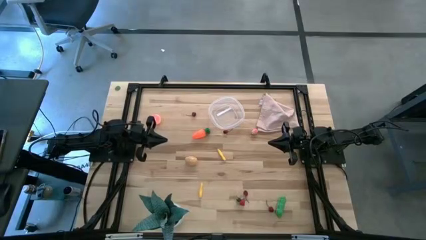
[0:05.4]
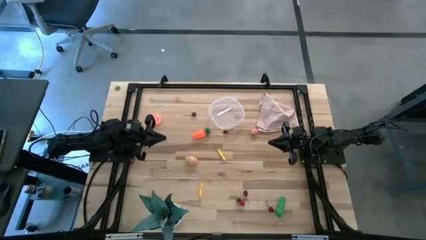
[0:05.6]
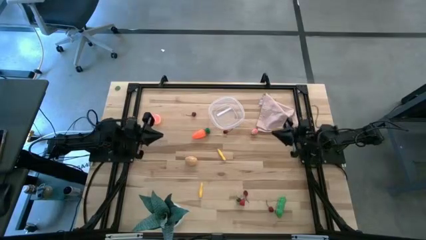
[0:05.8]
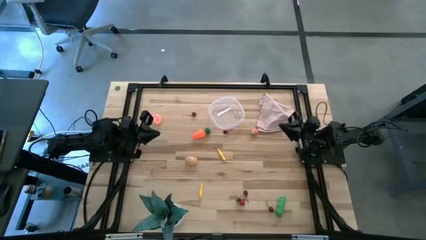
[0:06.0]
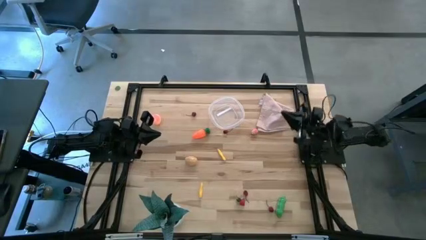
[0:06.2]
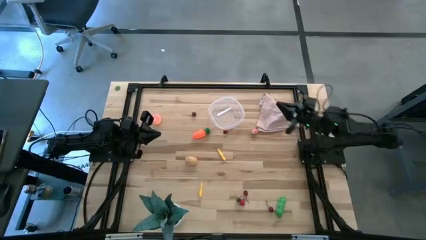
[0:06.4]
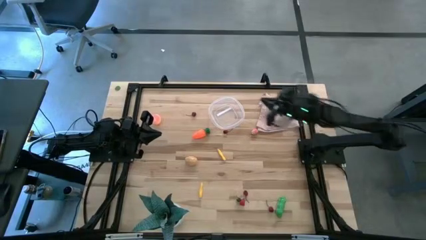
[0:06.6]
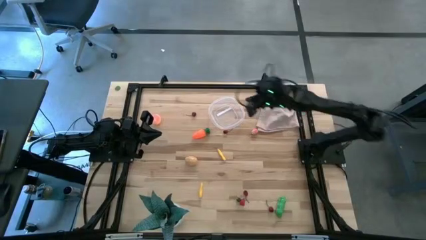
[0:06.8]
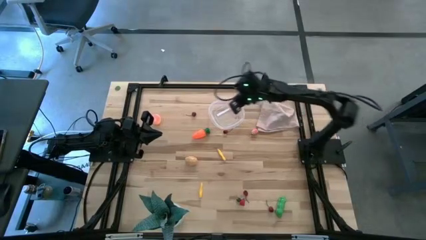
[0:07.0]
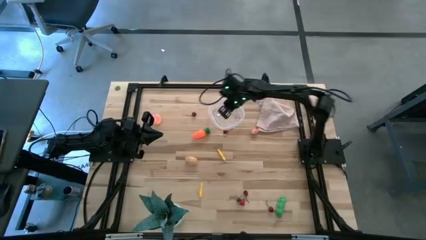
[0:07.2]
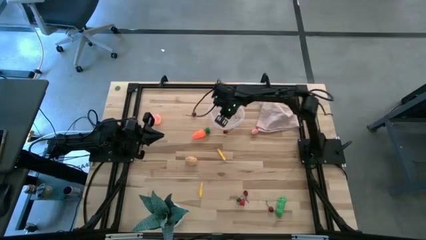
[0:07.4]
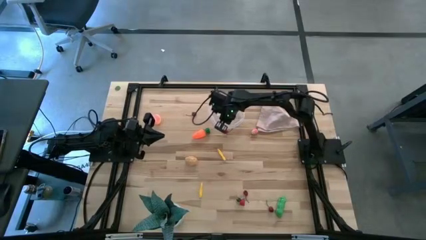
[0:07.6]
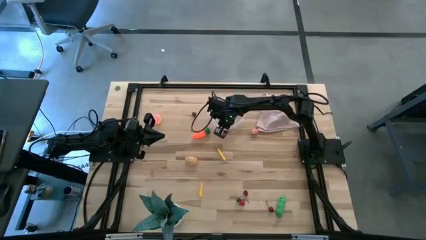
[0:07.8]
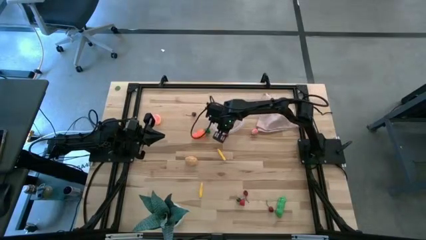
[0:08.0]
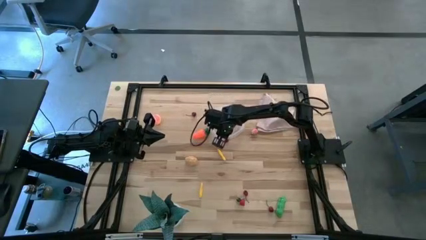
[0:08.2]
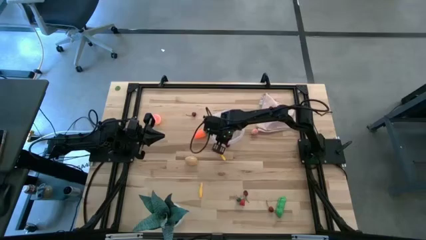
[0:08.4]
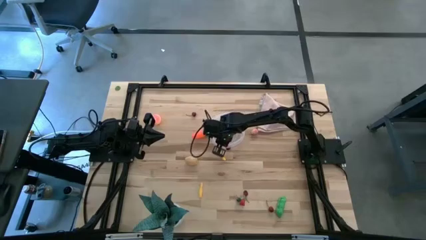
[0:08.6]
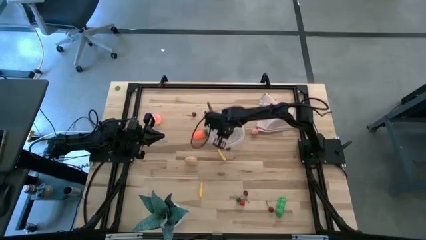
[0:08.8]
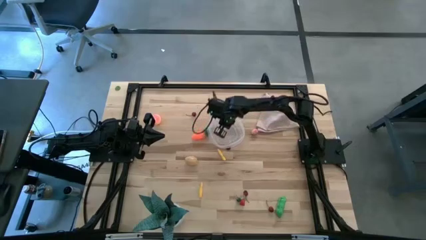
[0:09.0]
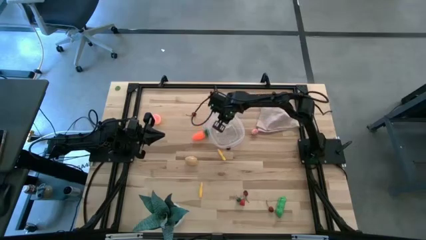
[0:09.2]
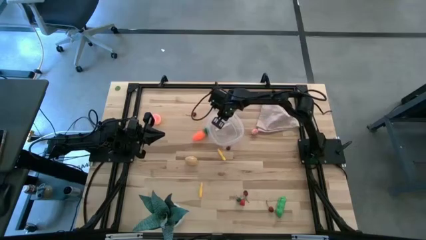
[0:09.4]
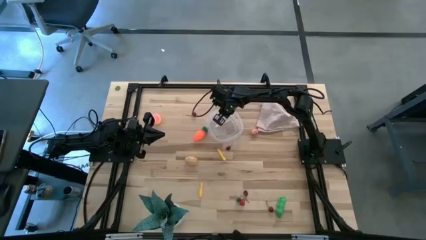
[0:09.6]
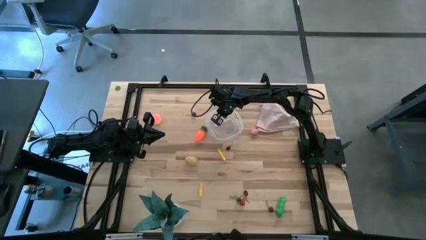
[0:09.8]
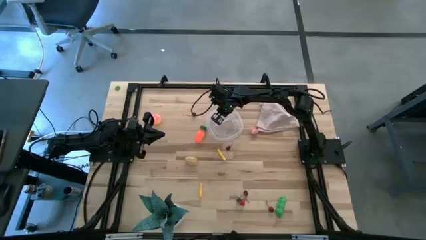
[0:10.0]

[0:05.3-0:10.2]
Task: Pick and placing Produce into tupperware
Adjust the transparent bin

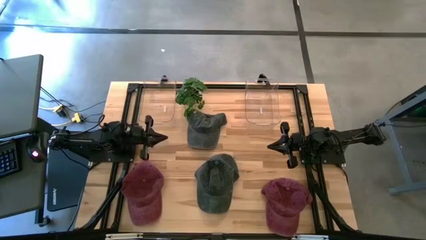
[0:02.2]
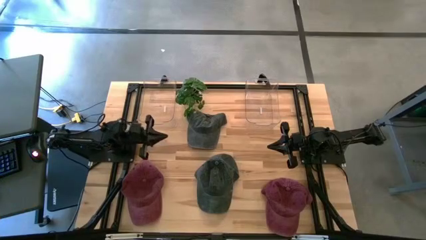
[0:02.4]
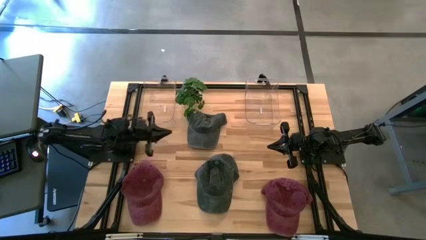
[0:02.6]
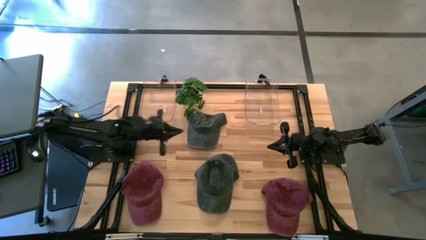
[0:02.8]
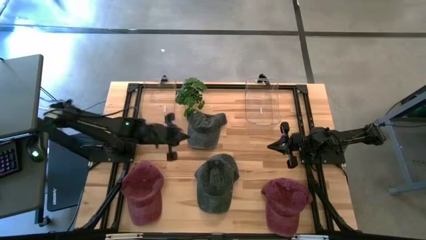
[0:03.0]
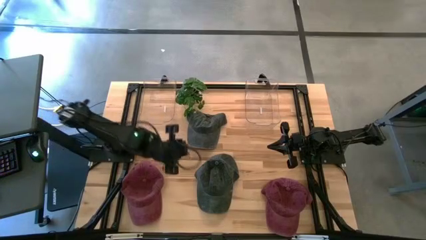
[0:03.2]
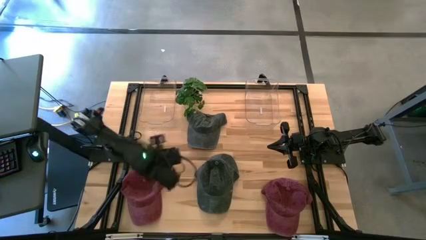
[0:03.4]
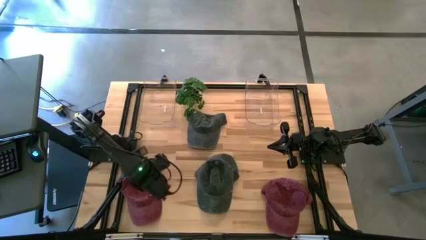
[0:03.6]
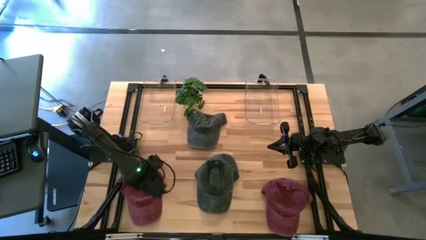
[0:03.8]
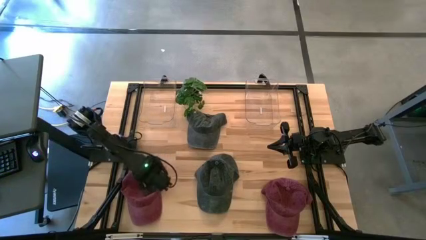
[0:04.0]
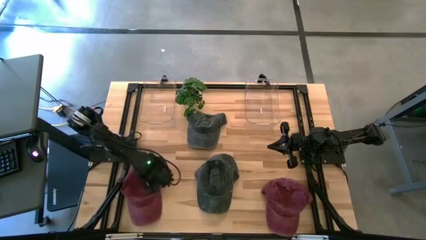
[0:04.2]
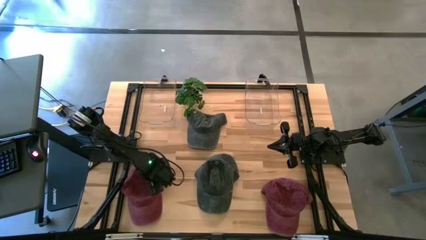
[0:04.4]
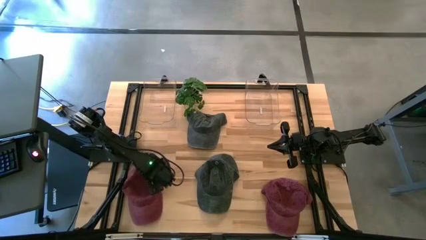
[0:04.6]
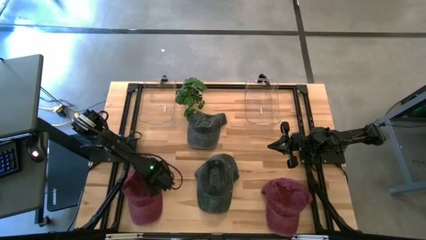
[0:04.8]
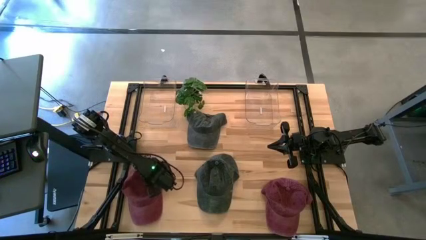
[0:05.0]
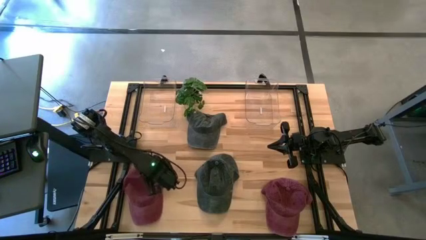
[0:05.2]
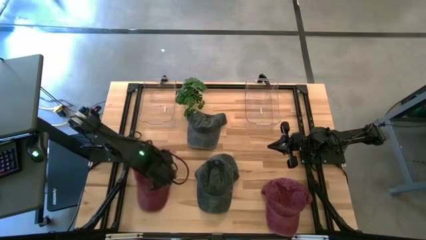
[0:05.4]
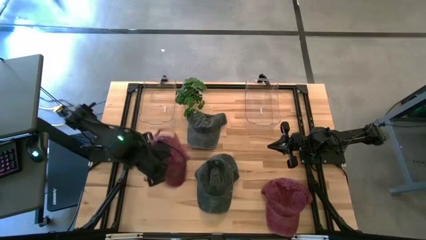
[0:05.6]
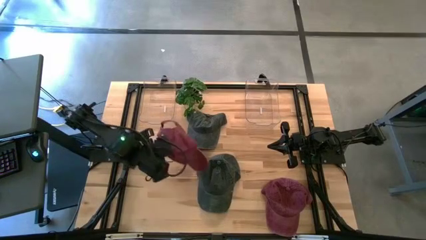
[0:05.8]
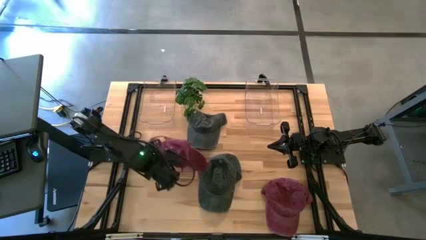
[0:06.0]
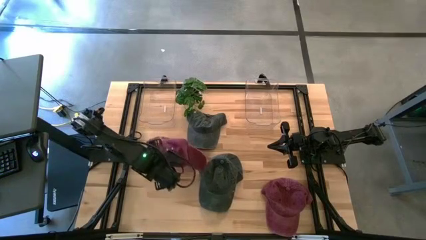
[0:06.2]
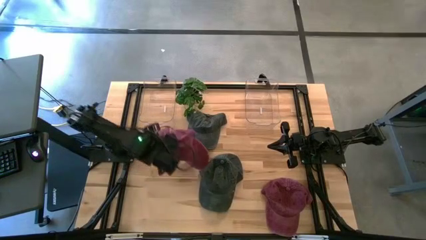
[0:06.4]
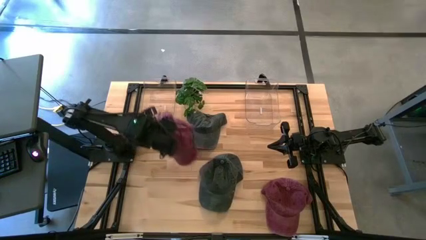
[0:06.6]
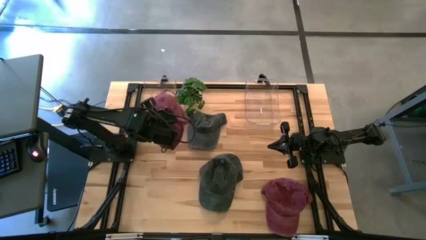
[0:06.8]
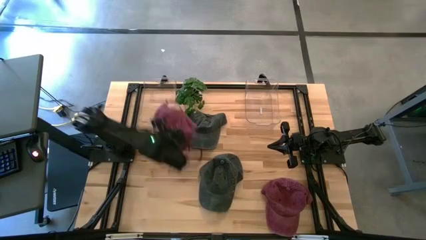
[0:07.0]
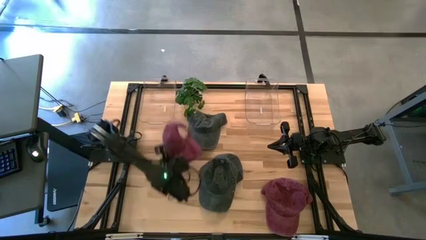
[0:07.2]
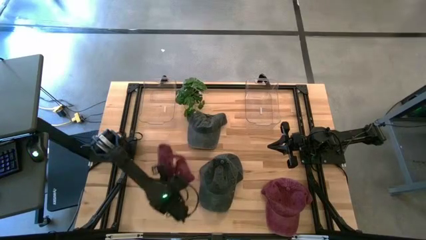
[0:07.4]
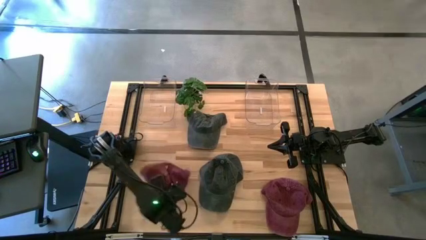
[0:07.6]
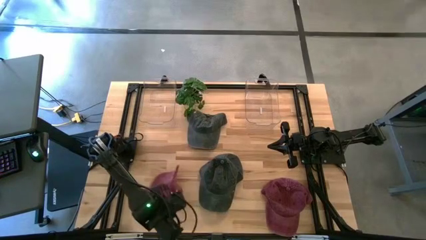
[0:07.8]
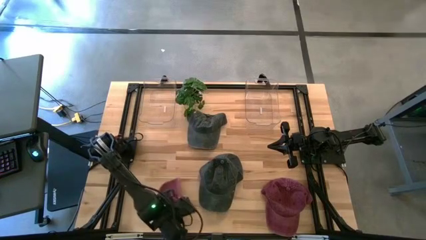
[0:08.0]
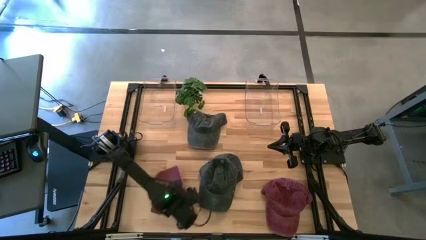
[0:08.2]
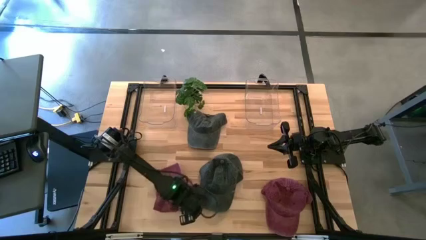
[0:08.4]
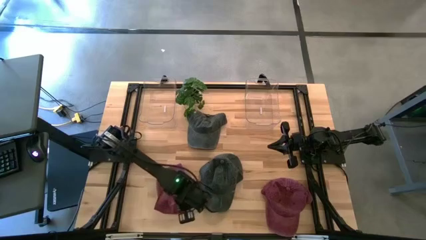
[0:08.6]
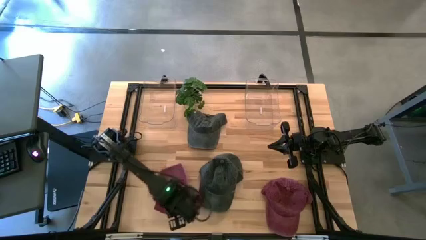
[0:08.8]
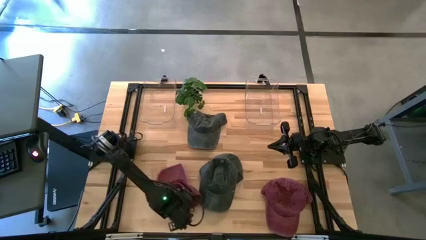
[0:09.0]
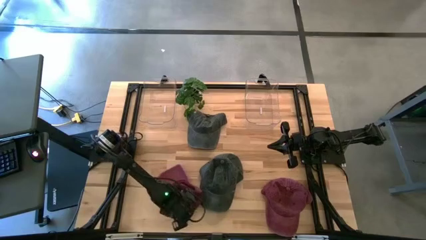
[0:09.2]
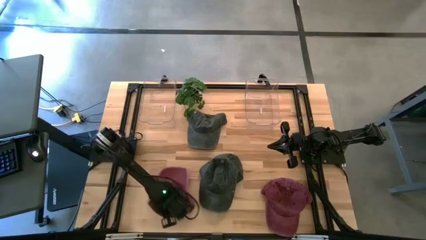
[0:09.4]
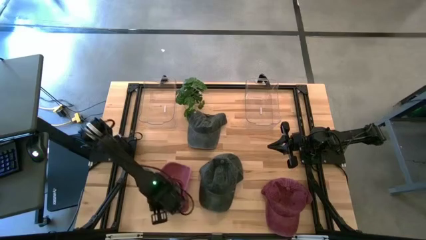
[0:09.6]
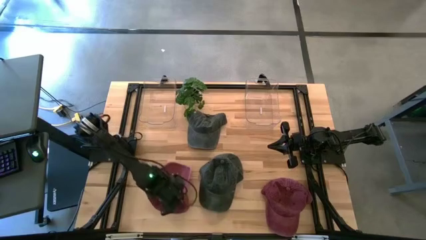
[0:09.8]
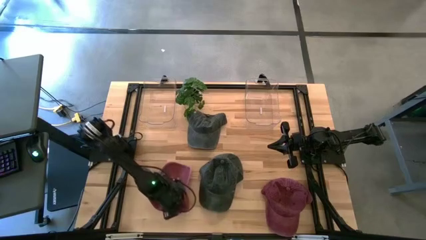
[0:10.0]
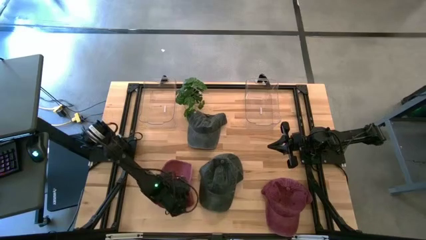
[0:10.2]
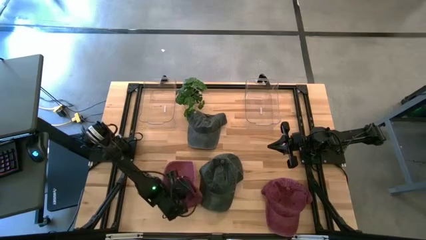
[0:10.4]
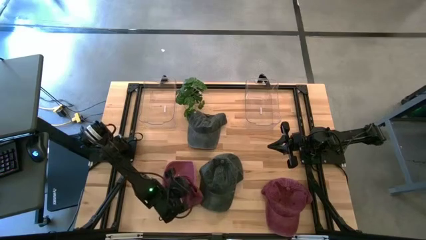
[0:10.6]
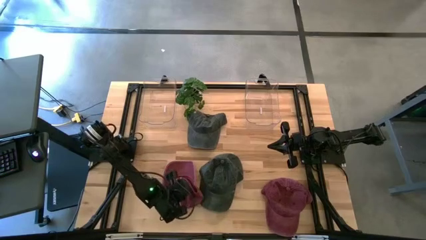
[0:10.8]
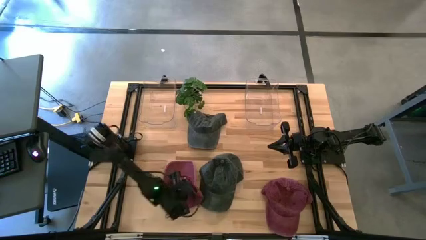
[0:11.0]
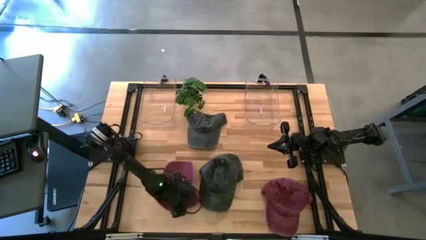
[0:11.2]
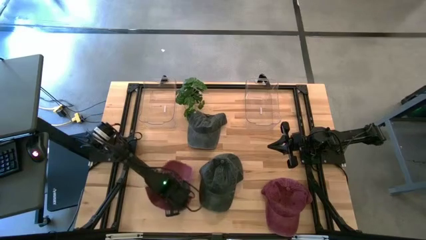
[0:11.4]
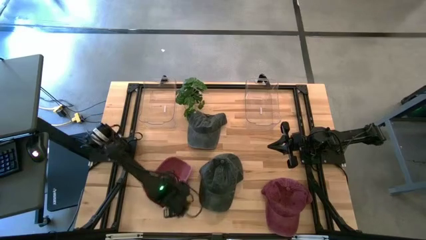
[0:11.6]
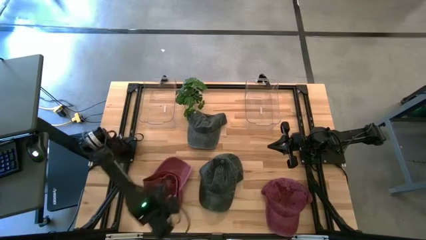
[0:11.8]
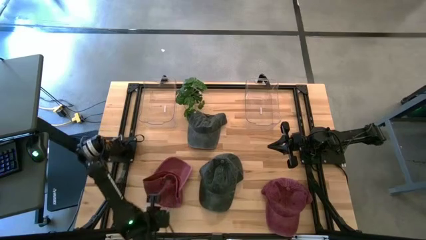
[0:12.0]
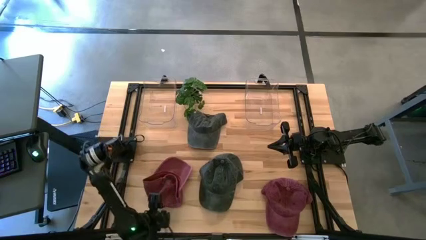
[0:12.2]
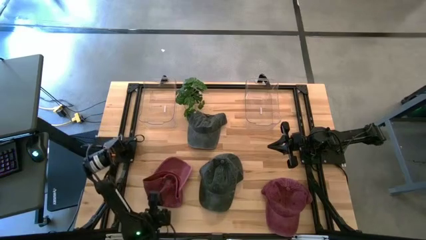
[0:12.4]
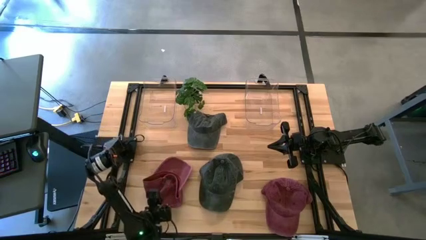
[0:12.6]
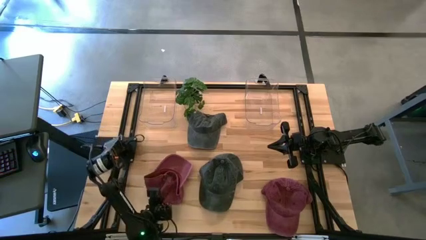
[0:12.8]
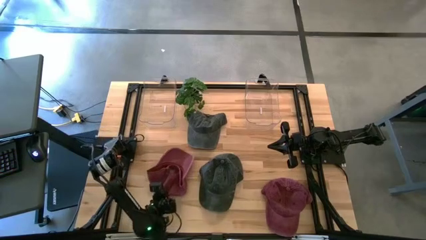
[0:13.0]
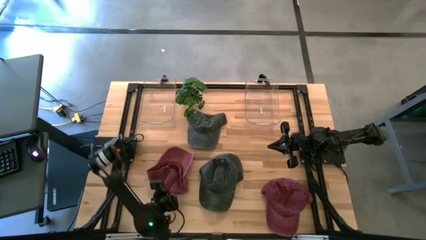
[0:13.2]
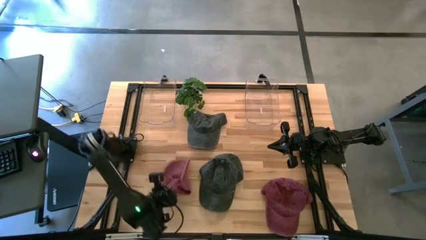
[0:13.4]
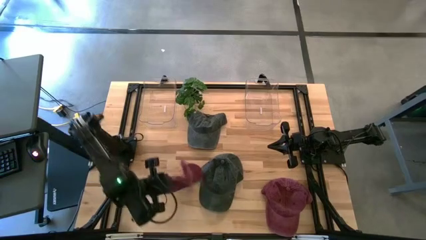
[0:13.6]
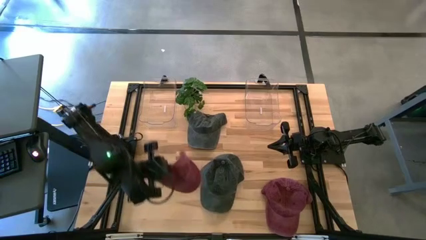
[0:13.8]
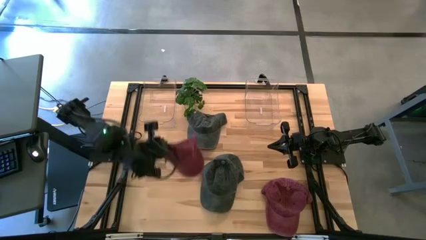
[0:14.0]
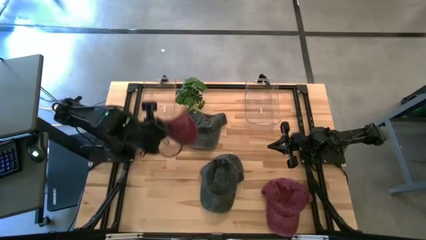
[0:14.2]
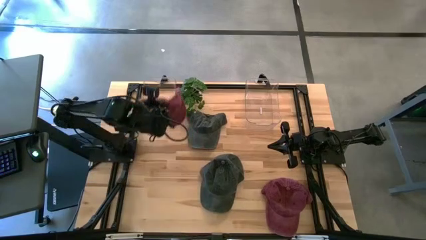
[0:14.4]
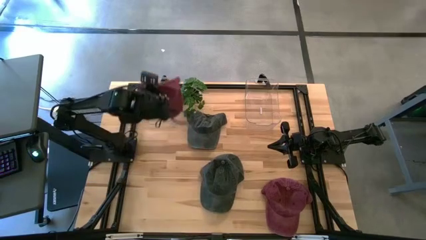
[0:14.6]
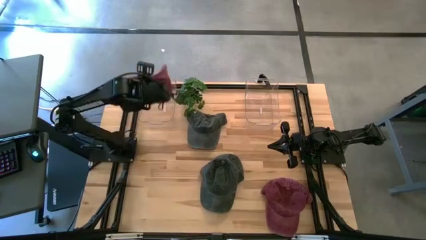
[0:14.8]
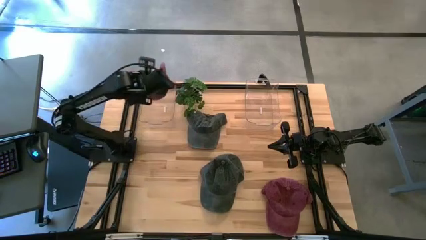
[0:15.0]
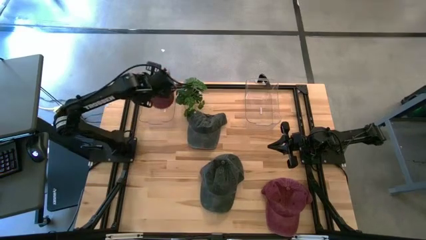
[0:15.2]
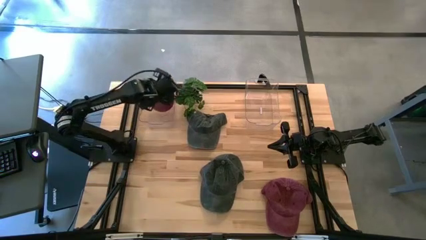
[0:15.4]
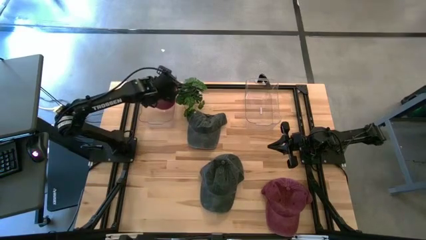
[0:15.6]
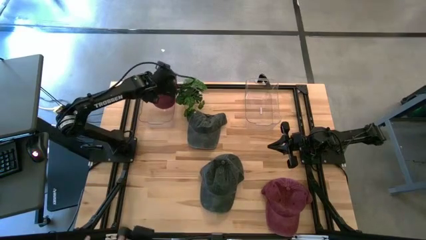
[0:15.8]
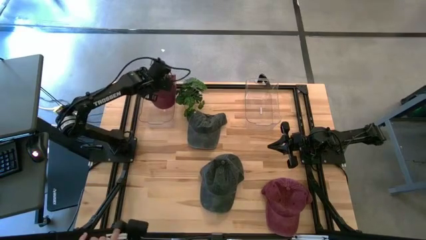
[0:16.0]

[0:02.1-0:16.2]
Task: Pick & Place hat
Put the left red cap into the left transparent bin
